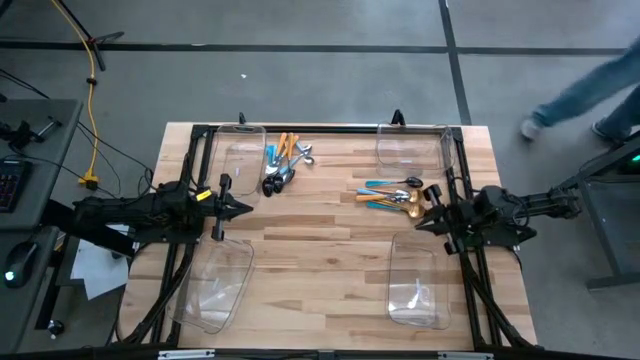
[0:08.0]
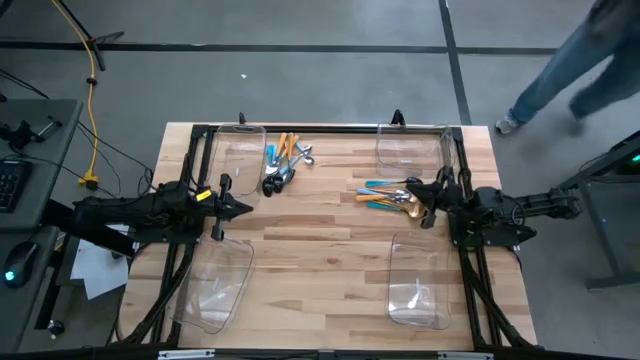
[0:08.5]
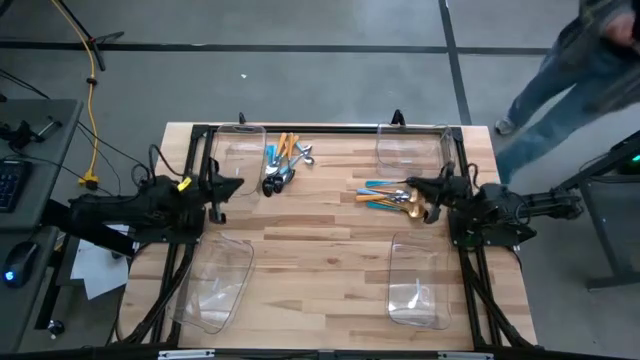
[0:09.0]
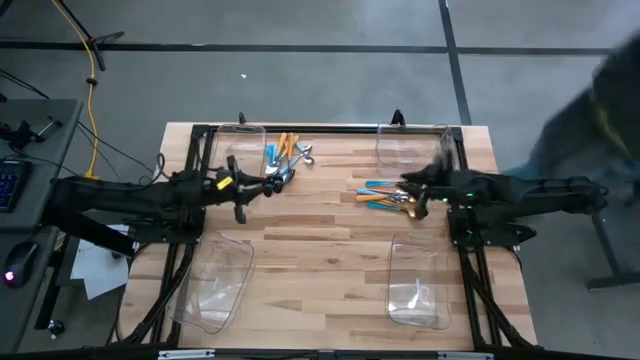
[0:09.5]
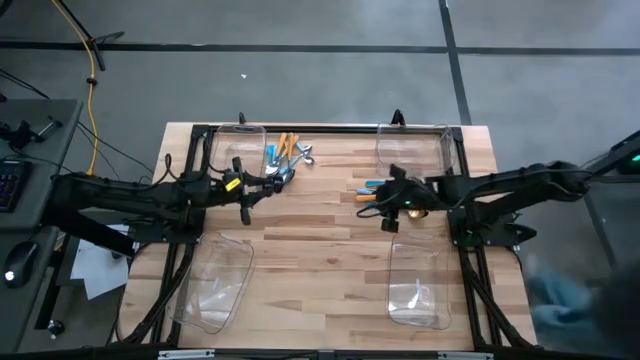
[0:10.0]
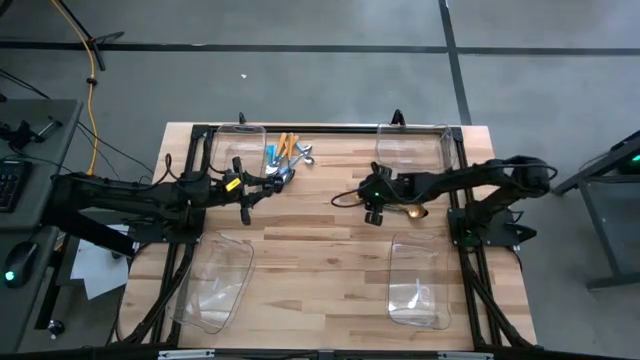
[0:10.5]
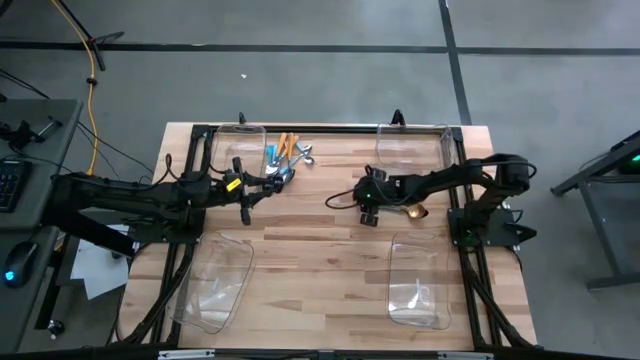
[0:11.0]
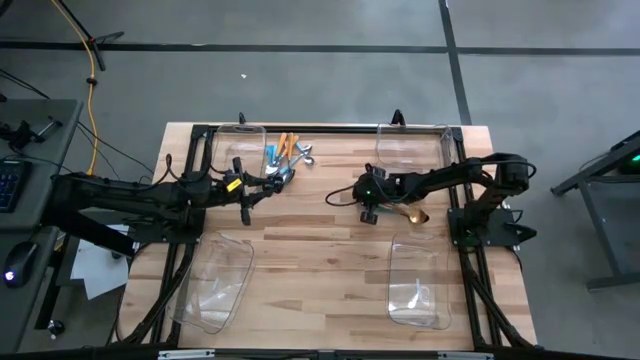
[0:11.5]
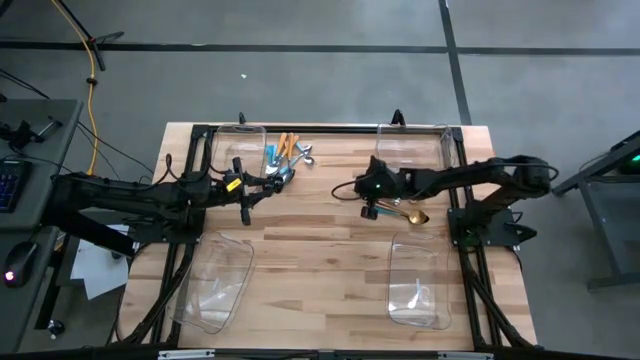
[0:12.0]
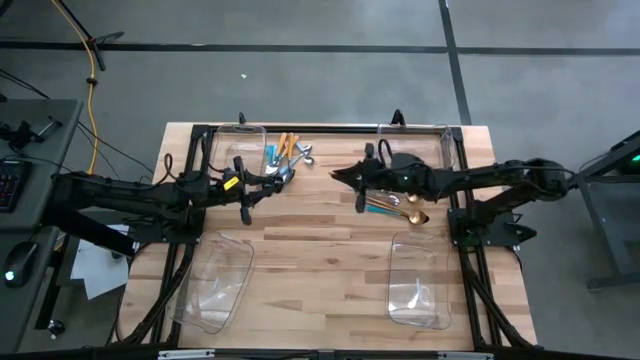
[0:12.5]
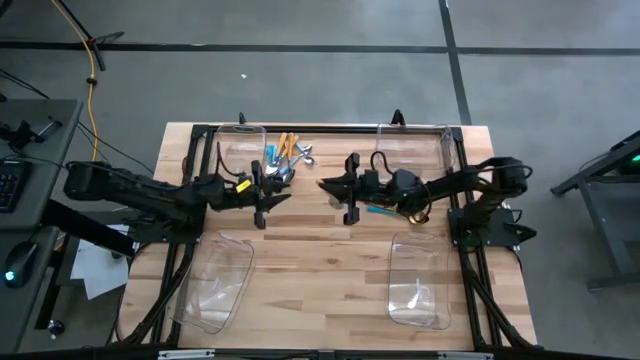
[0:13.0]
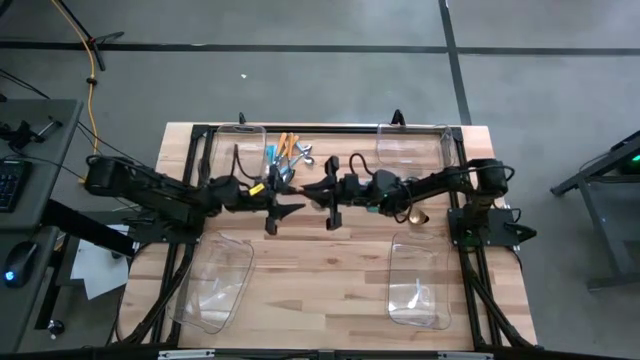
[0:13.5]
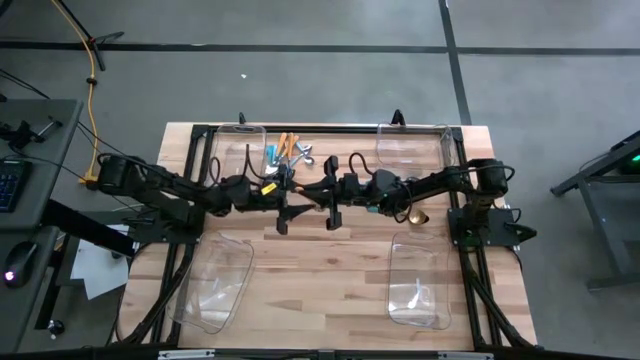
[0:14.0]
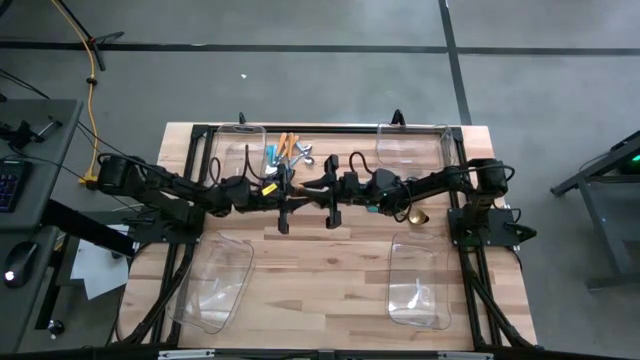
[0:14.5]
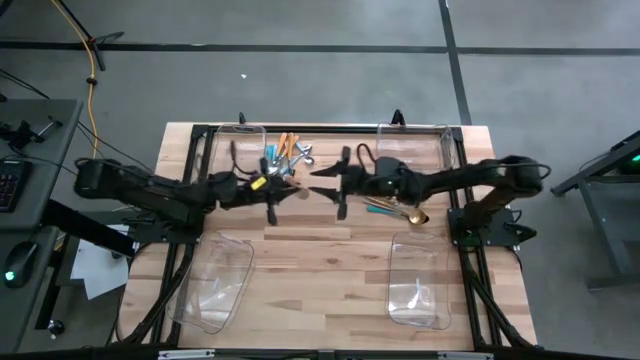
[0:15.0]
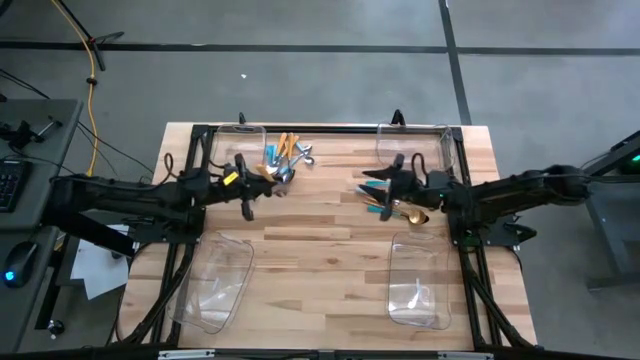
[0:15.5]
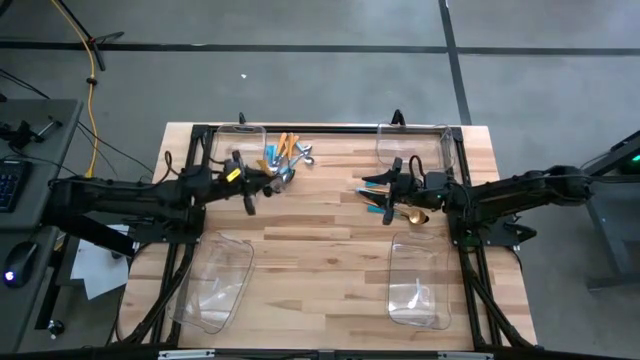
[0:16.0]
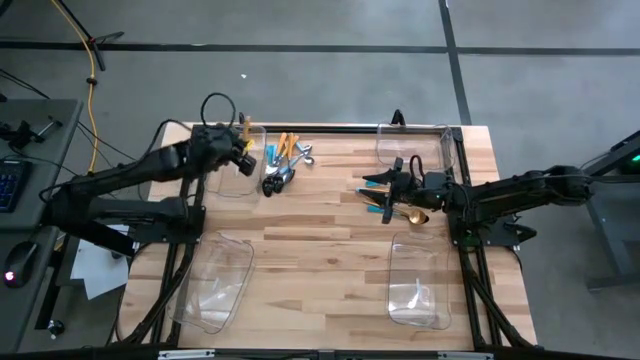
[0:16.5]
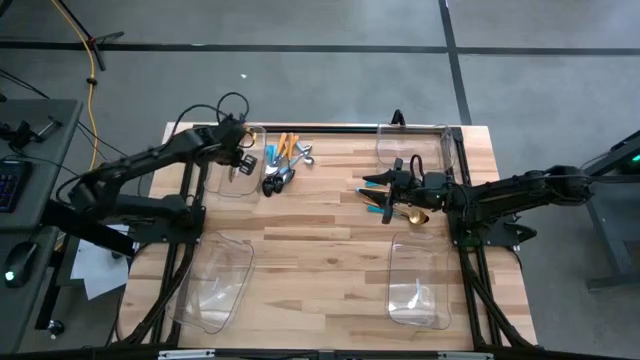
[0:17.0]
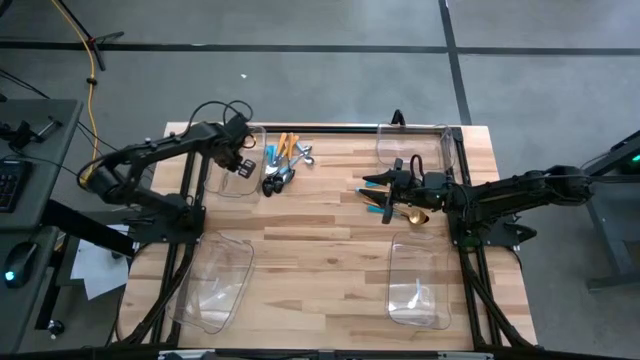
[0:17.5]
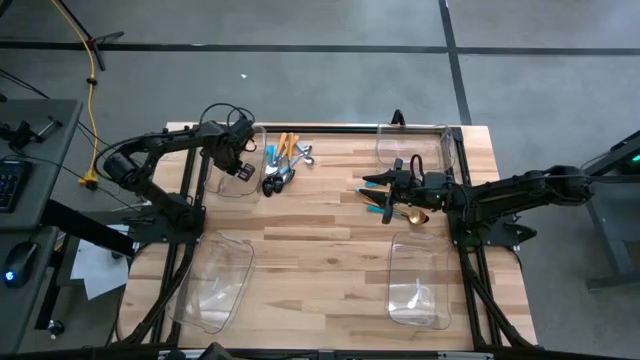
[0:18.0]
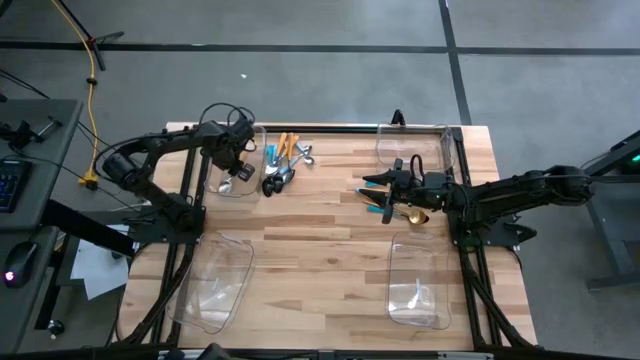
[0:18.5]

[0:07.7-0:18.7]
Task: Sort silverware by color (type)
Put the yellow spoon into the top left transparent bin

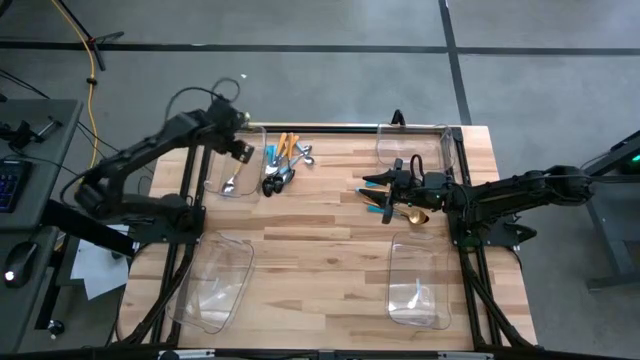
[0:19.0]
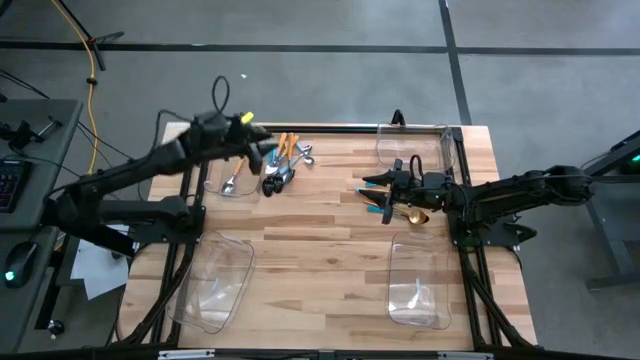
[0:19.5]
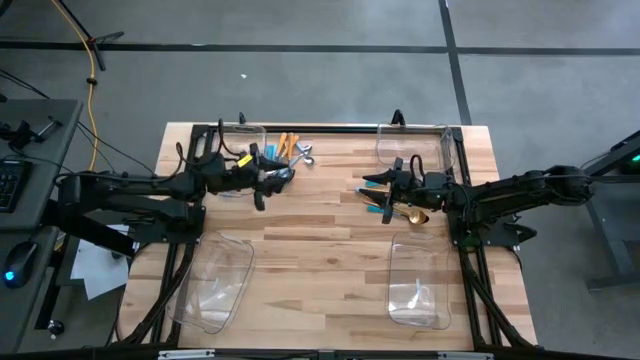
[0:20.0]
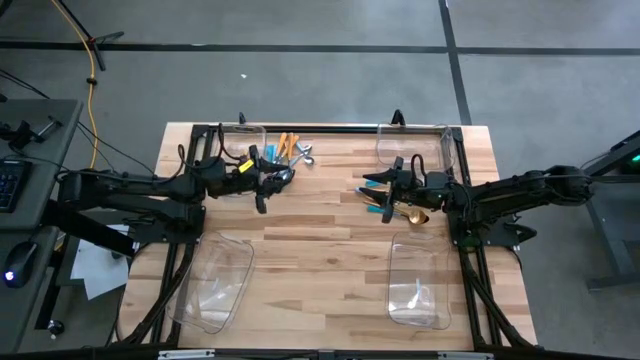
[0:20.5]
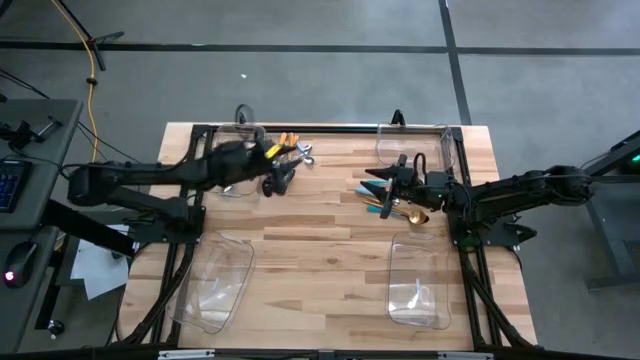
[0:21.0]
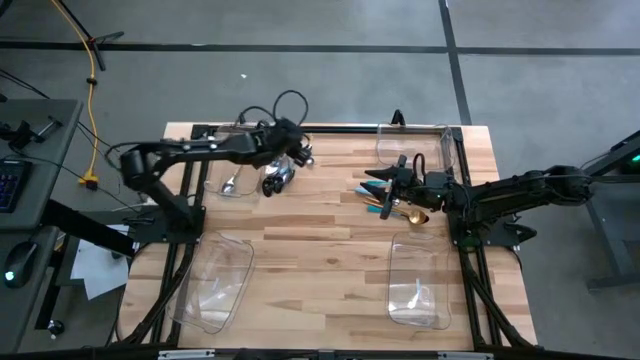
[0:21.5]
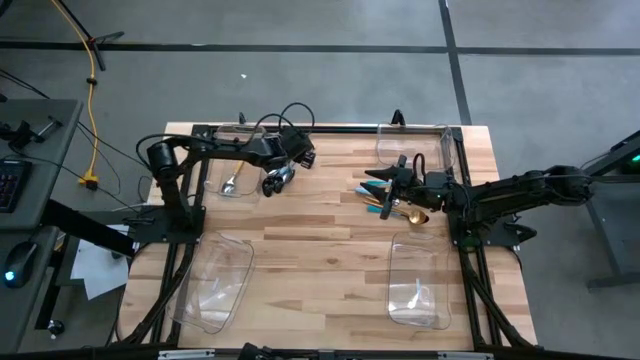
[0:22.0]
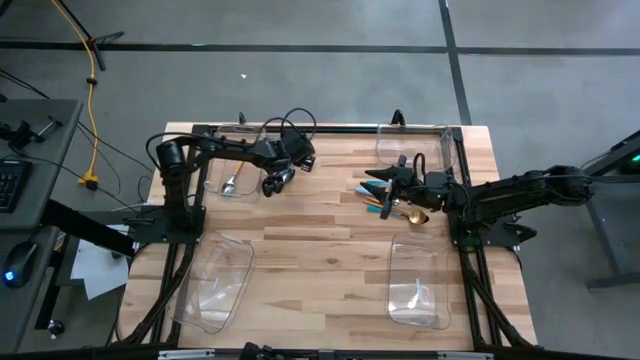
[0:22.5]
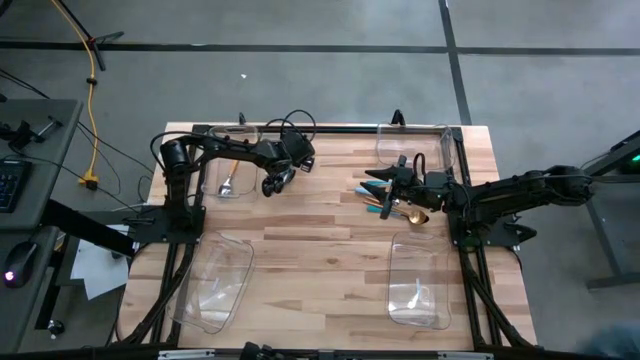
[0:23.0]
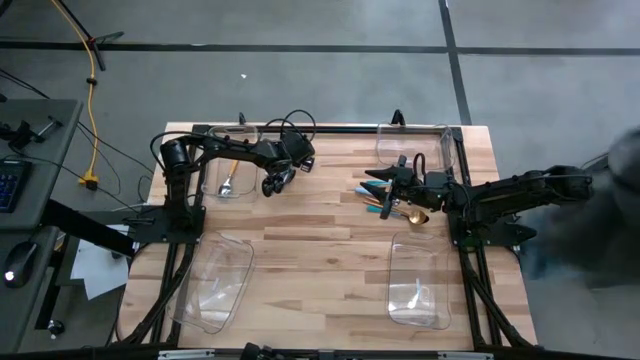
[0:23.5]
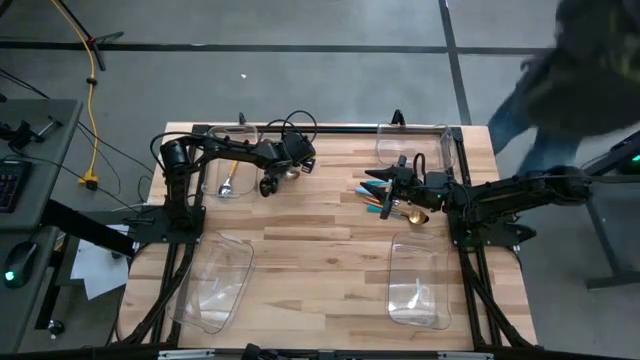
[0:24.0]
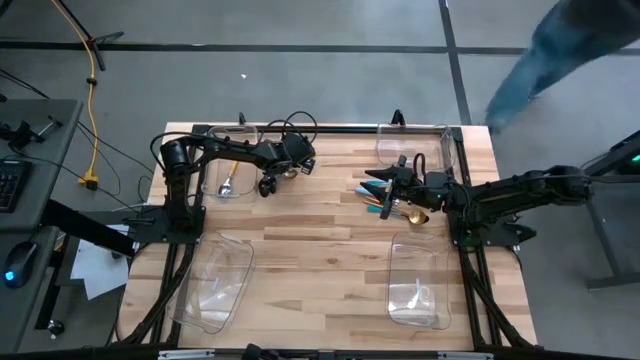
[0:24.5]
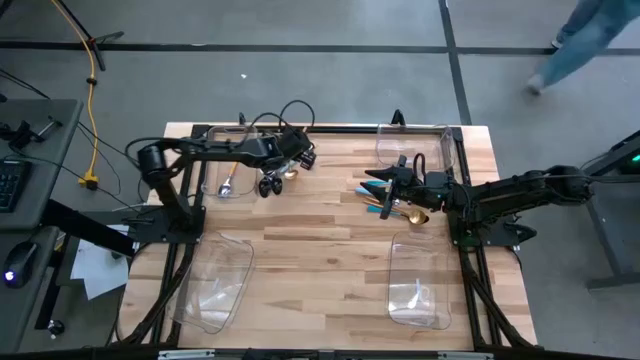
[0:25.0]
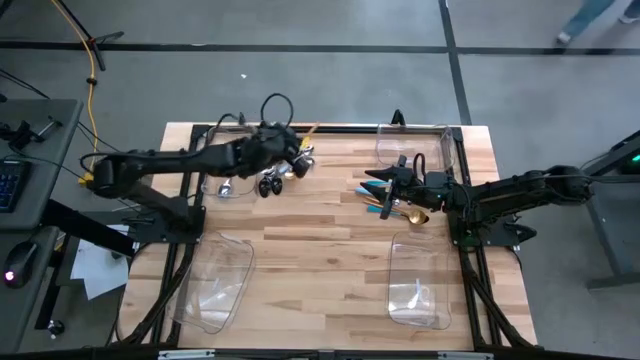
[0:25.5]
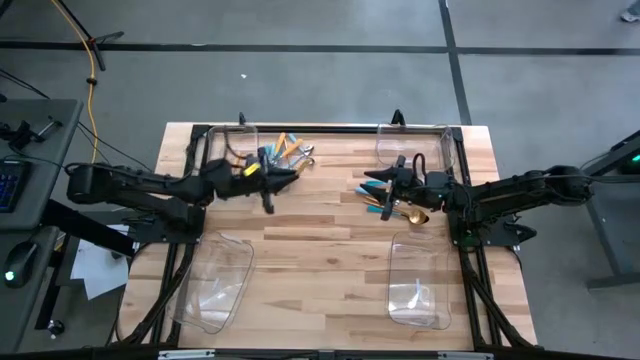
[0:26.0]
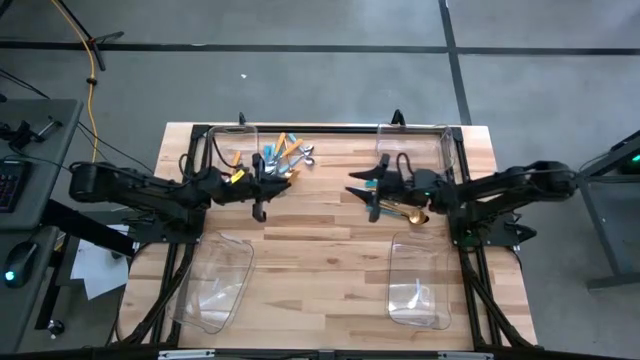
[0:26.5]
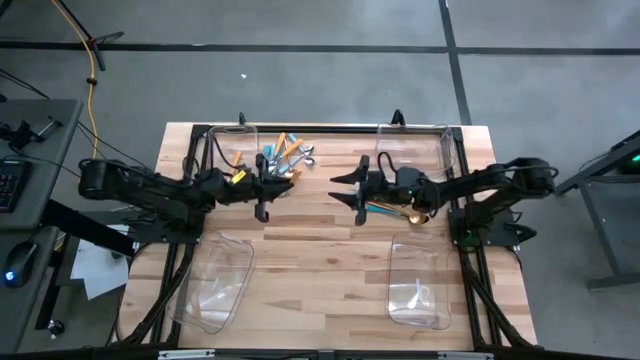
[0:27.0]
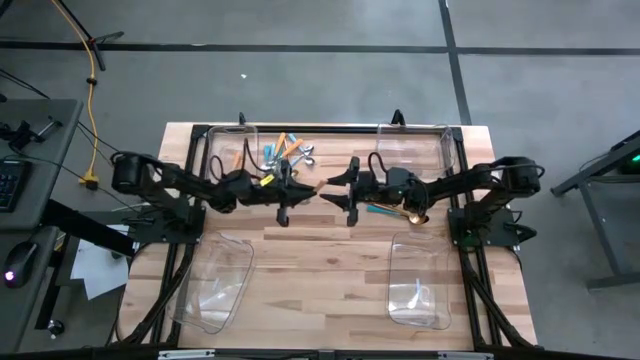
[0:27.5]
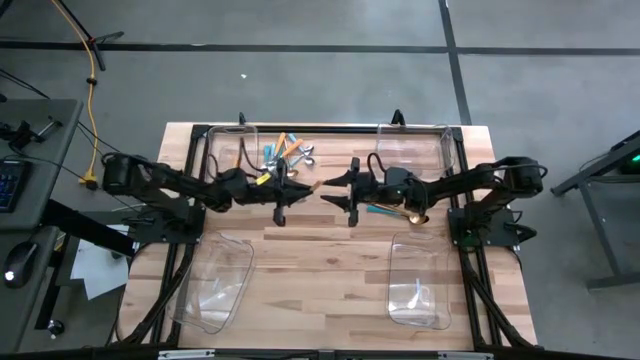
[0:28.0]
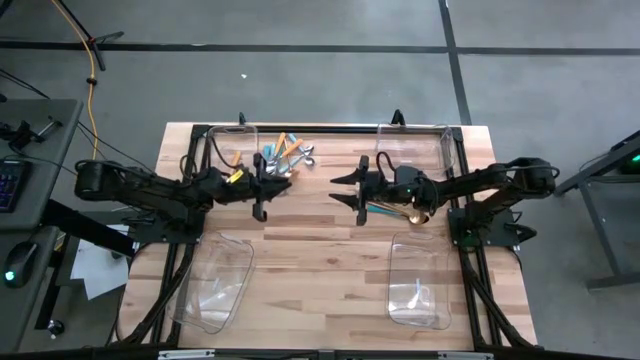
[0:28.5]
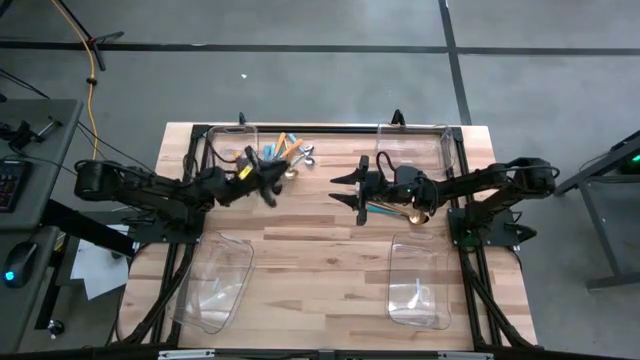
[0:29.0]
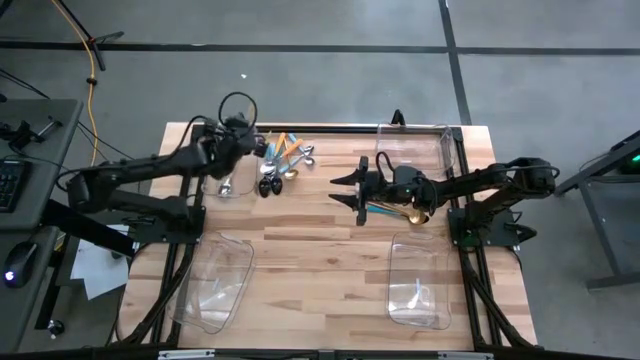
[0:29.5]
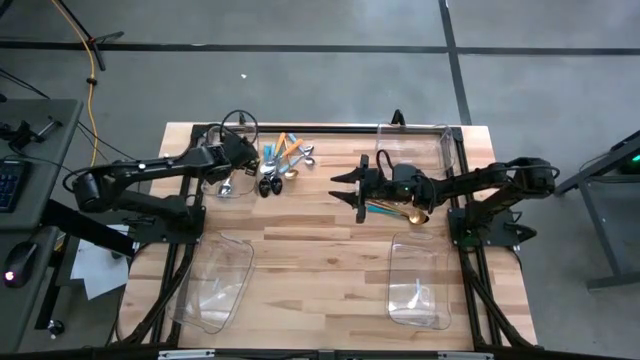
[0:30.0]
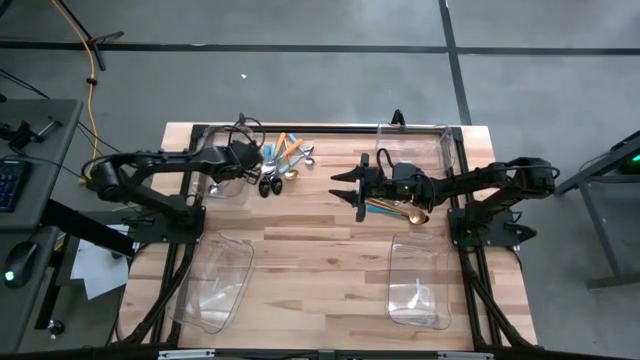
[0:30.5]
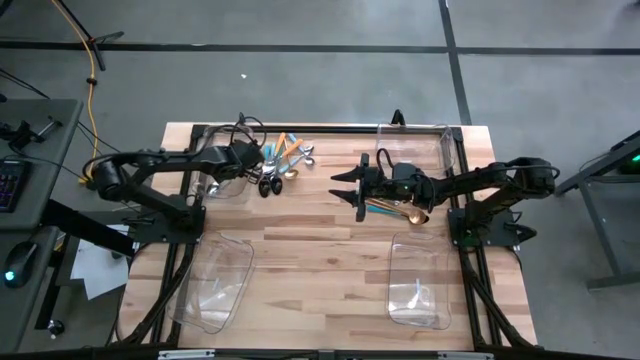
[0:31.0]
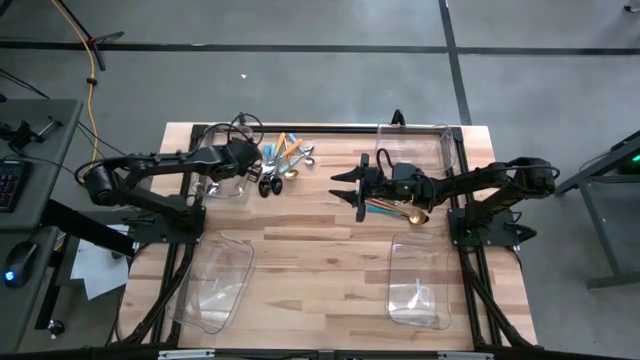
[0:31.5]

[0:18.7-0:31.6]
Put the yellow spoon into the top left transparent bin
